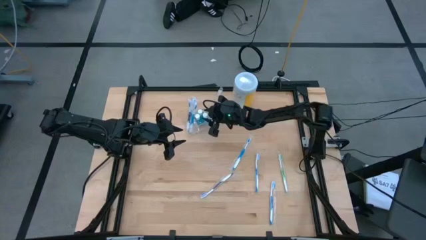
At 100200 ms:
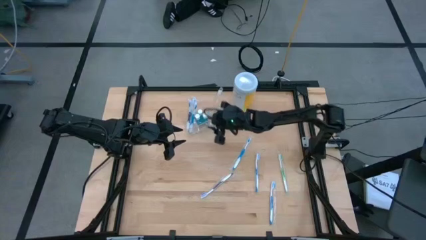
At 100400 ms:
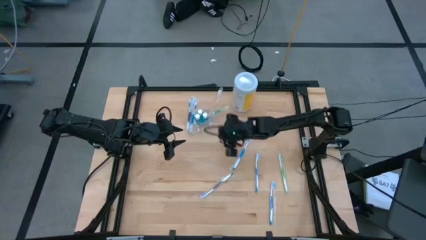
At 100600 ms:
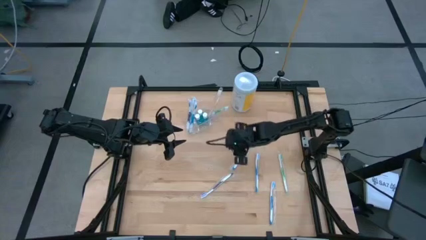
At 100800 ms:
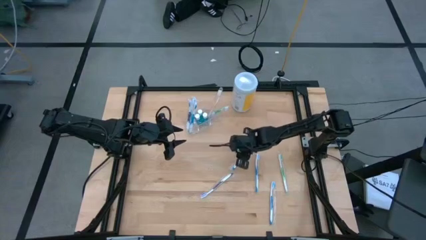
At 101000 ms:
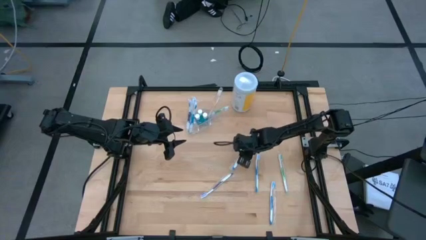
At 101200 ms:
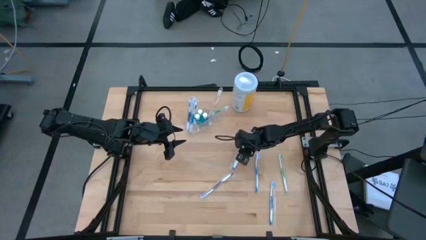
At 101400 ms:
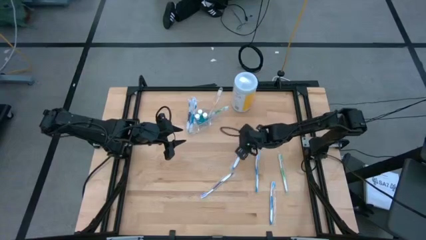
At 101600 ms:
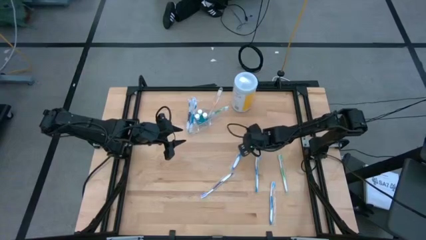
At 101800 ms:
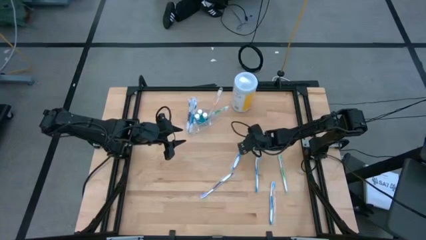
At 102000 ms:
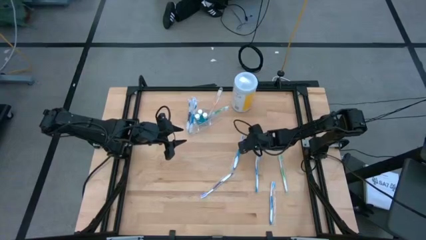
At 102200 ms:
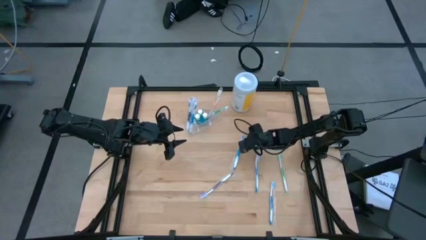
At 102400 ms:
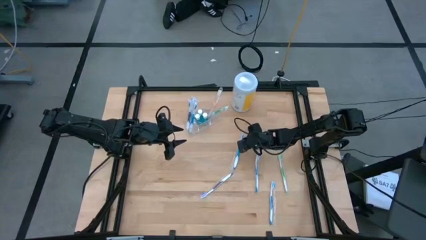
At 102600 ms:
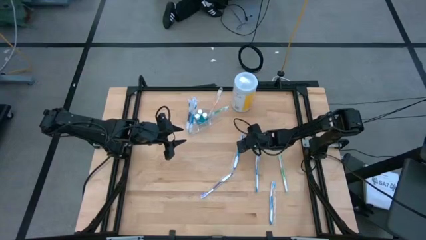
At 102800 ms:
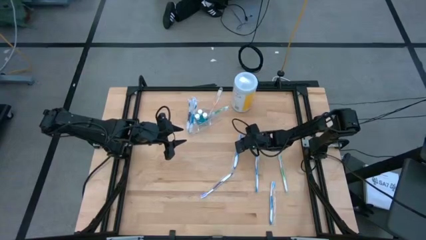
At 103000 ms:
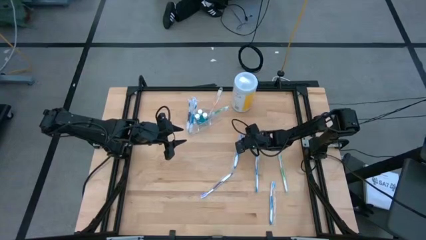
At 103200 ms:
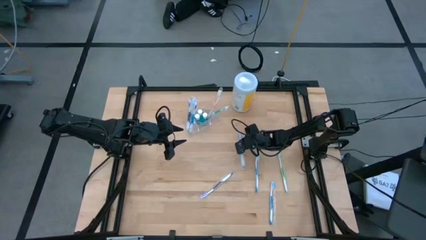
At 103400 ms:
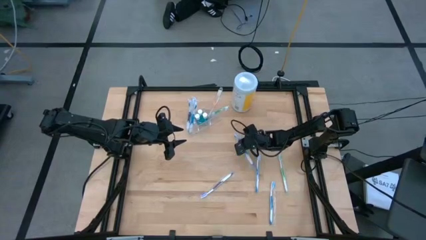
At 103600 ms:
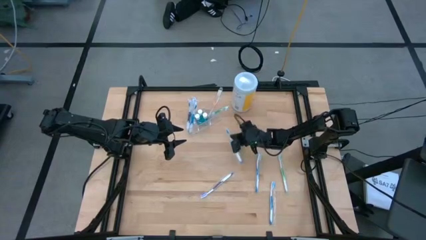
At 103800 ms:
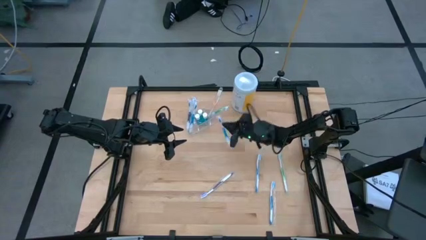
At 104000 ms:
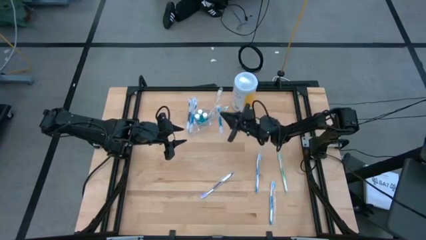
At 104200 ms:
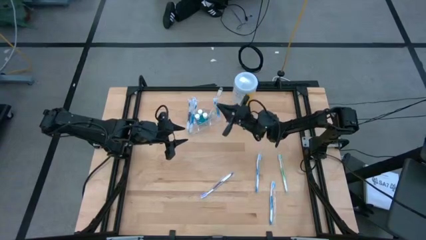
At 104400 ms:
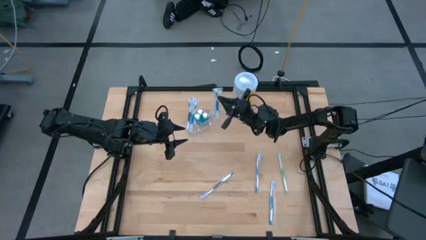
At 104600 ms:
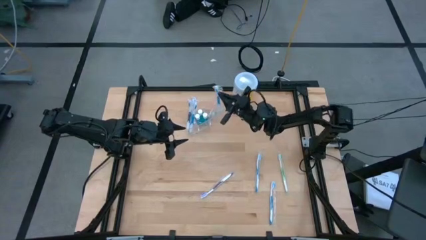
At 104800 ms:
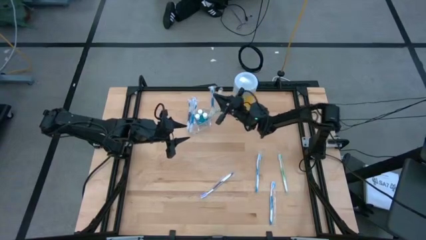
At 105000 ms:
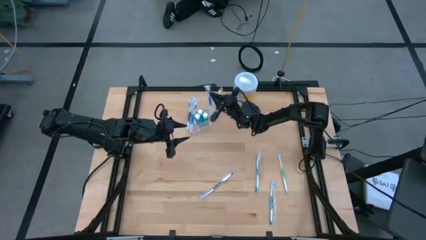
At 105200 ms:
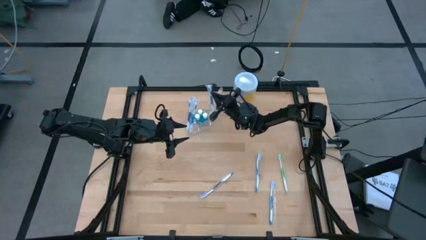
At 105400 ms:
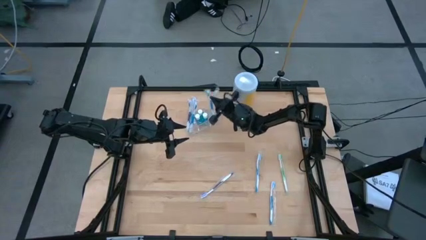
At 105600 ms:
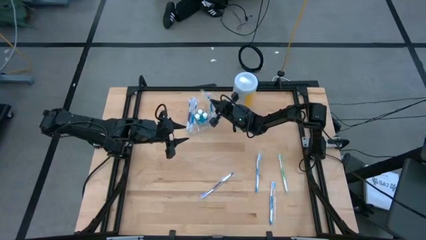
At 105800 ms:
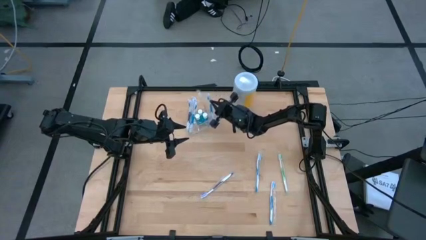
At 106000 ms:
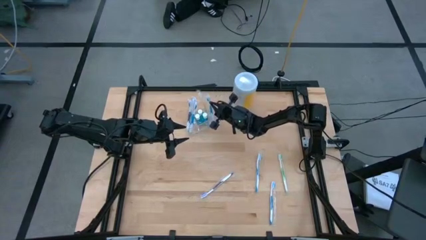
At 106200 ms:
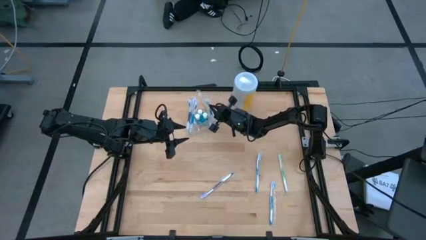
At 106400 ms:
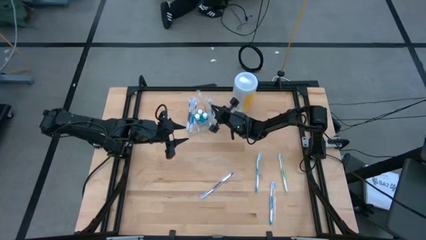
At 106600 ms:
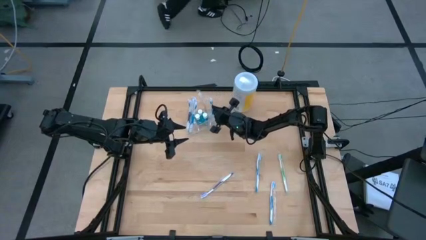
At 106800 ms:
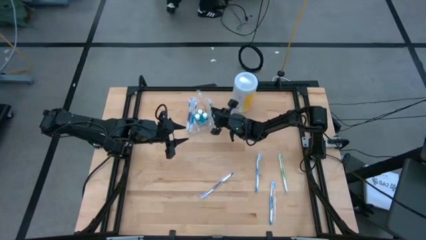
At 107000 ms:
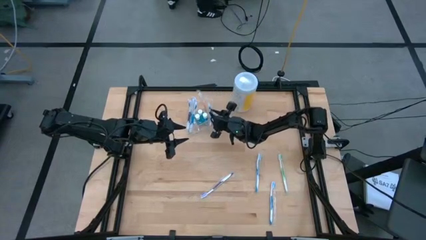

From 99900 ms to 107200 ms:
Task: Pick & Place toothbrushing station
Put the blue toothbrush into the transparent organizer
